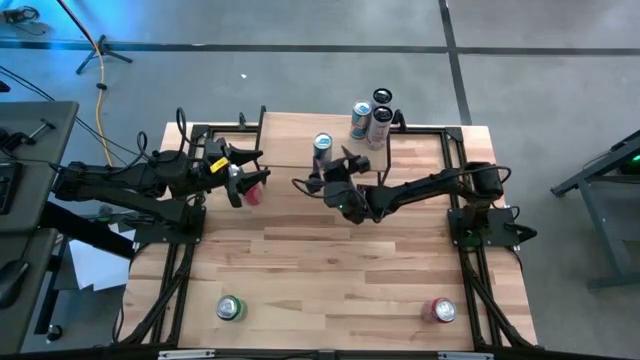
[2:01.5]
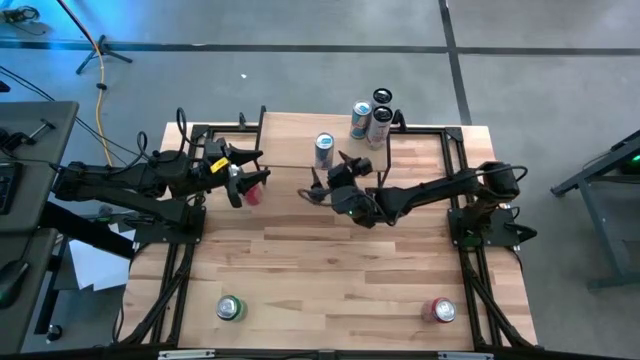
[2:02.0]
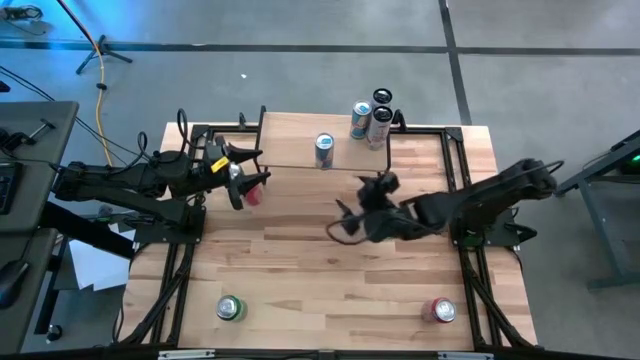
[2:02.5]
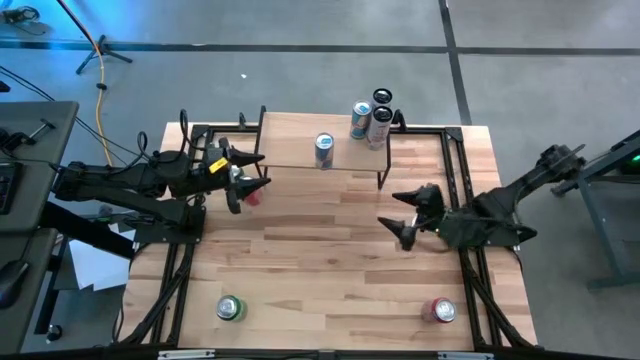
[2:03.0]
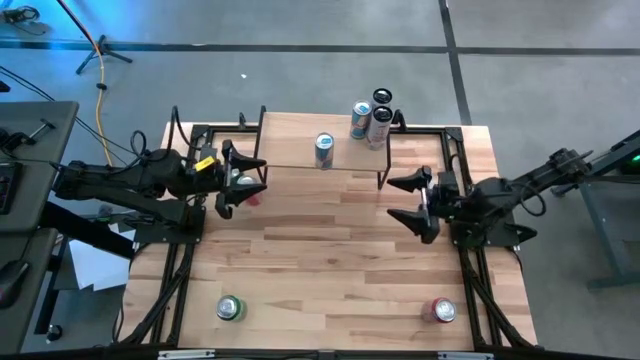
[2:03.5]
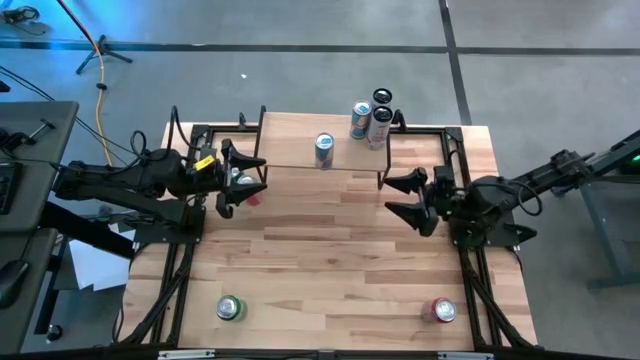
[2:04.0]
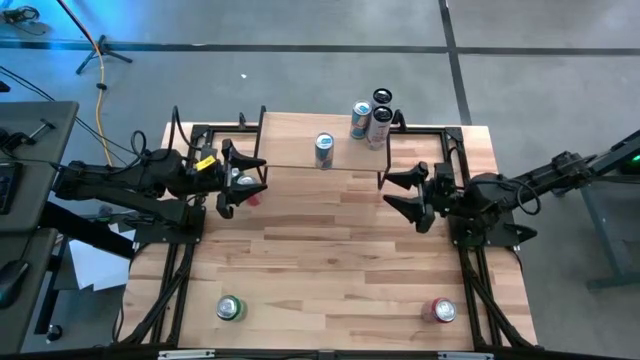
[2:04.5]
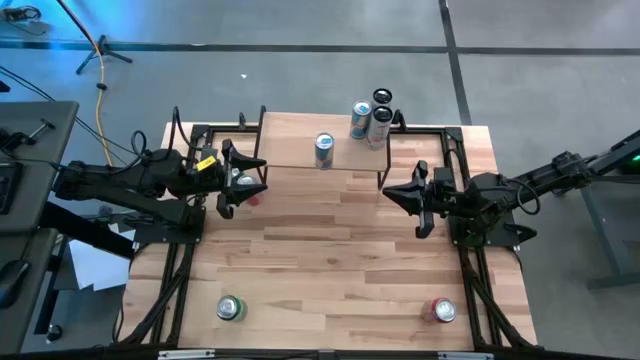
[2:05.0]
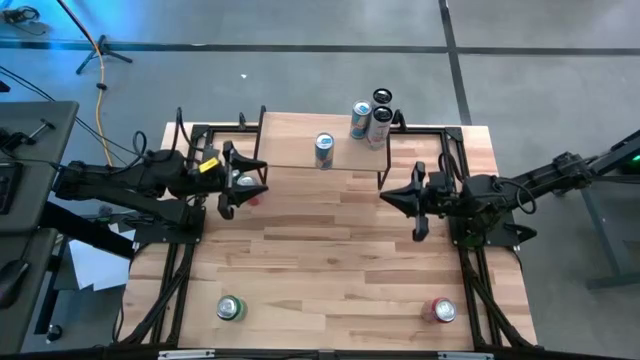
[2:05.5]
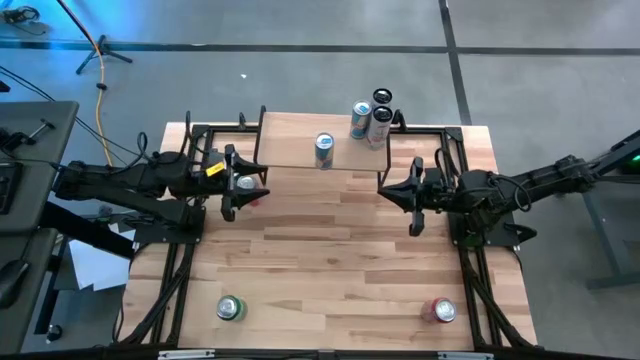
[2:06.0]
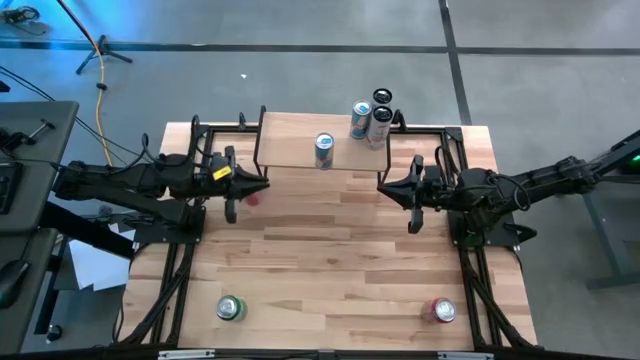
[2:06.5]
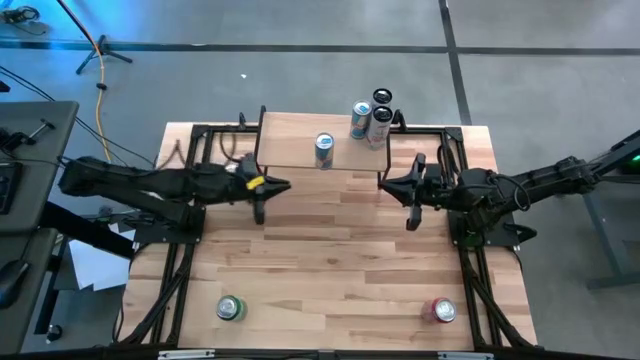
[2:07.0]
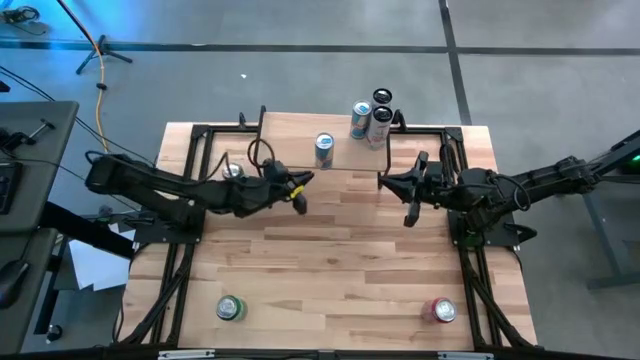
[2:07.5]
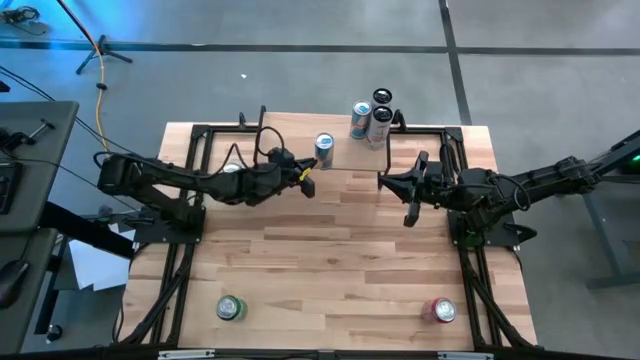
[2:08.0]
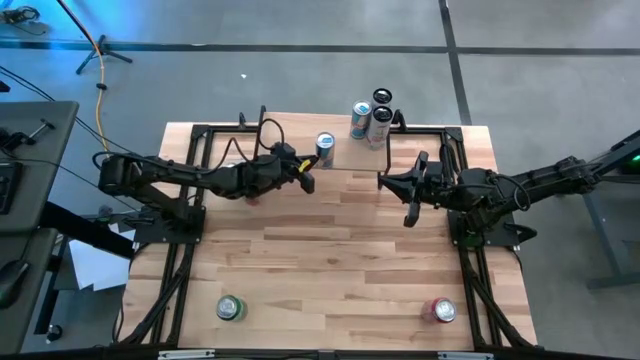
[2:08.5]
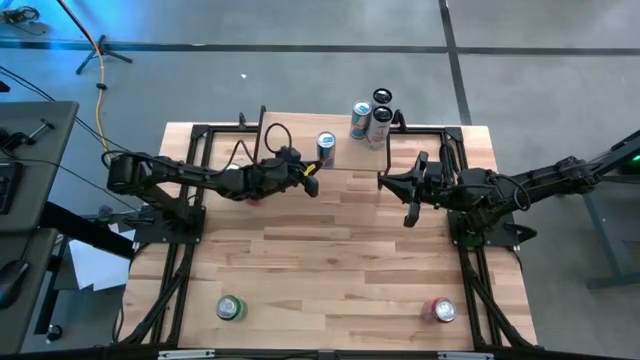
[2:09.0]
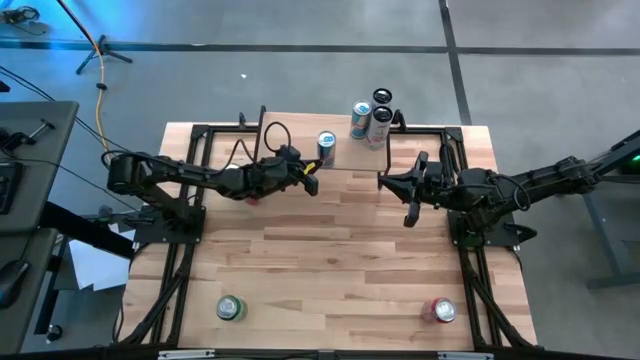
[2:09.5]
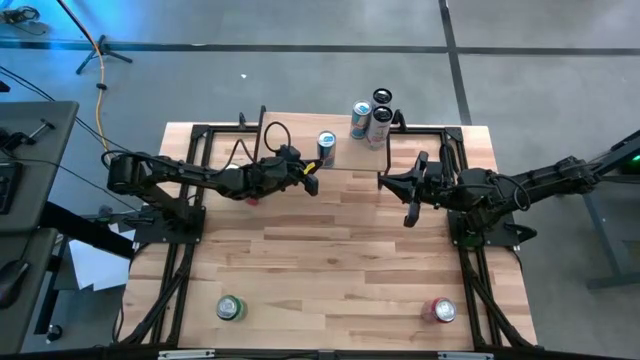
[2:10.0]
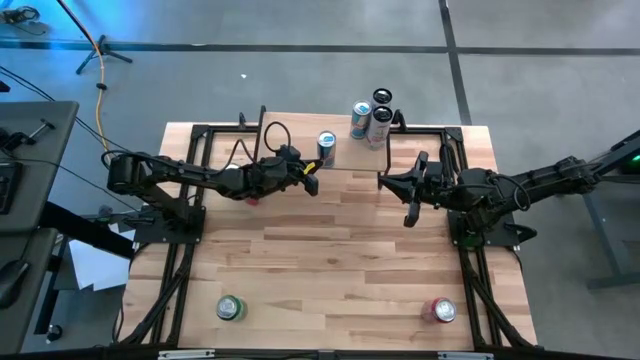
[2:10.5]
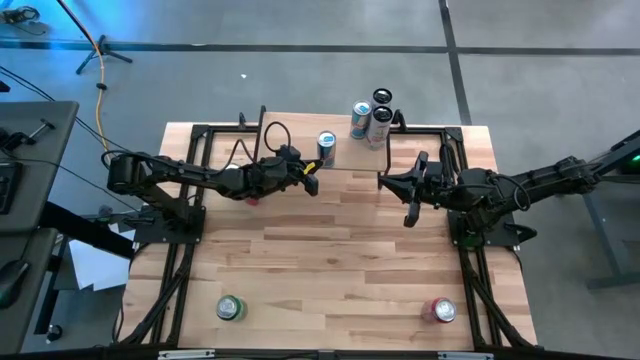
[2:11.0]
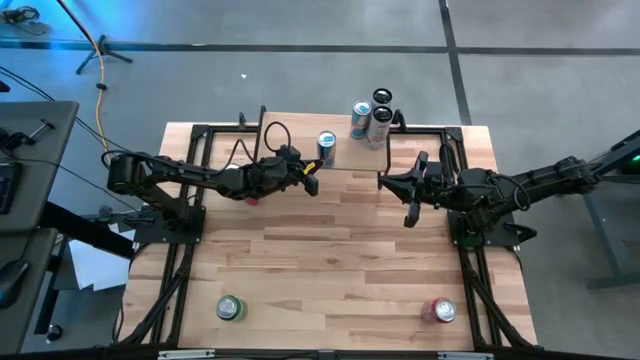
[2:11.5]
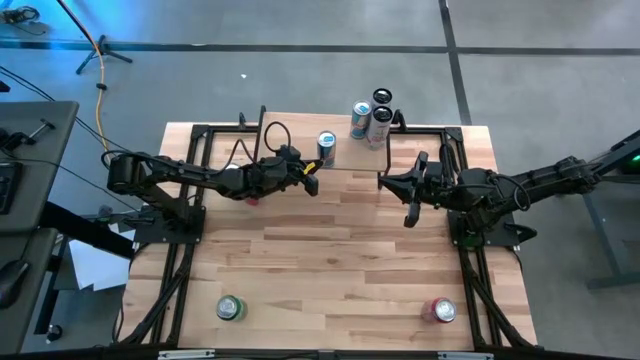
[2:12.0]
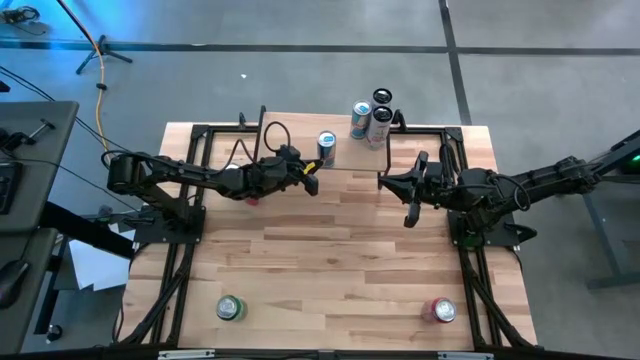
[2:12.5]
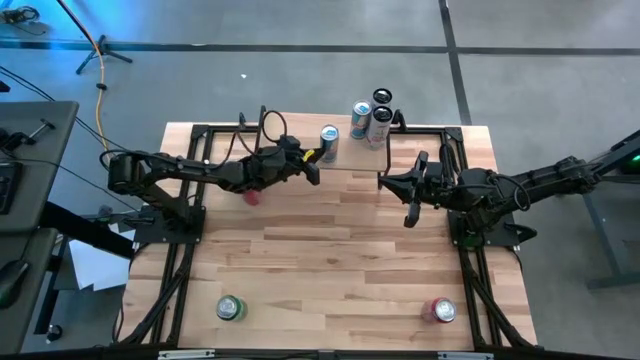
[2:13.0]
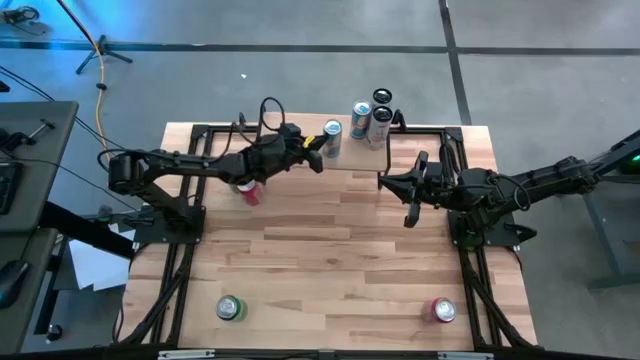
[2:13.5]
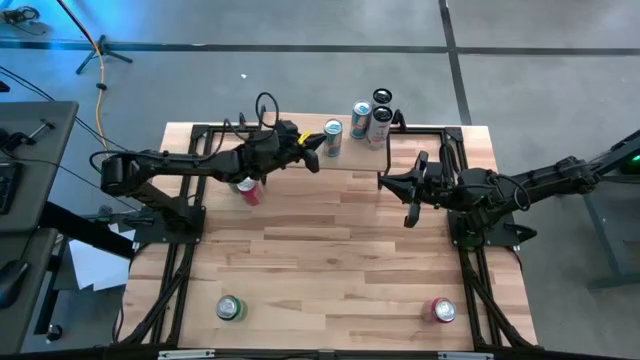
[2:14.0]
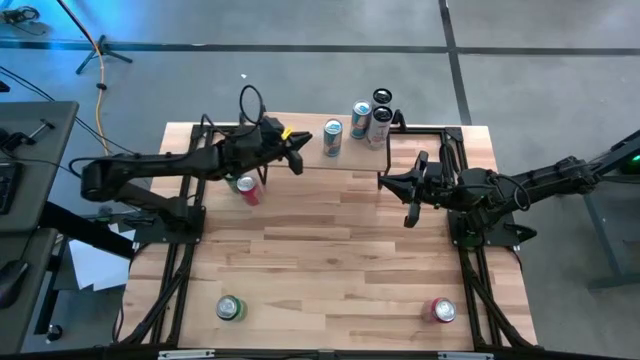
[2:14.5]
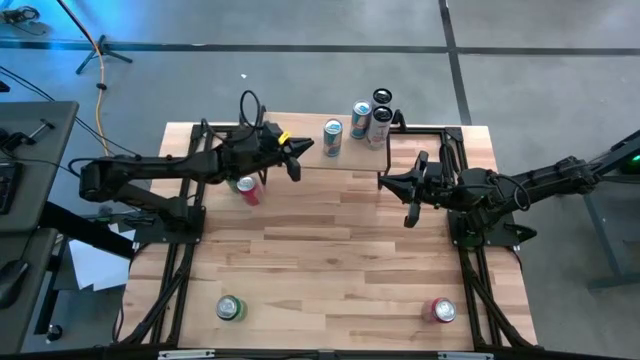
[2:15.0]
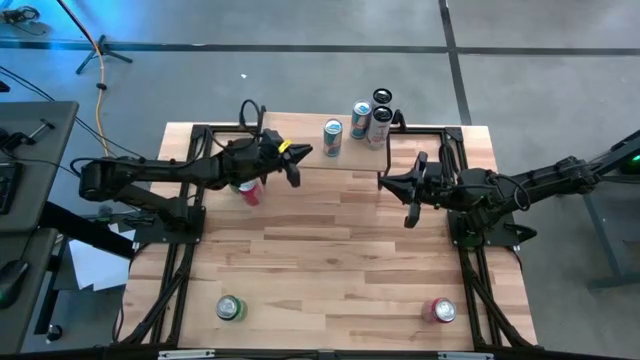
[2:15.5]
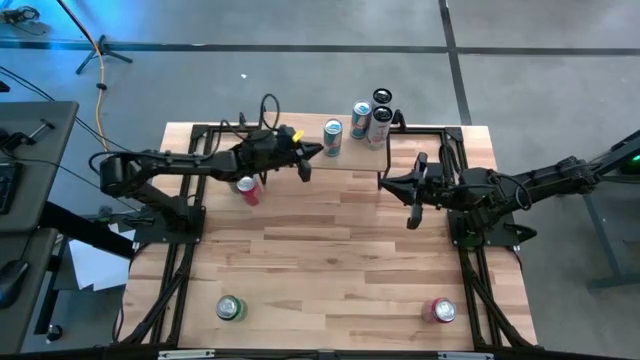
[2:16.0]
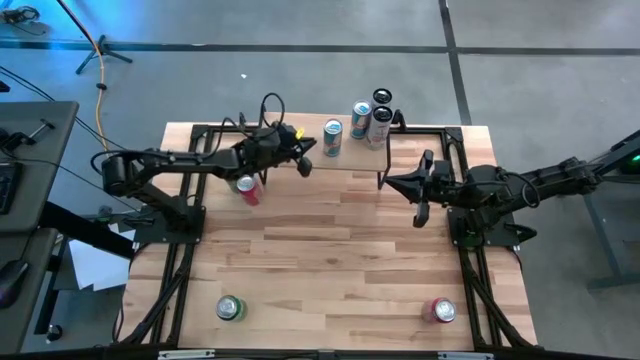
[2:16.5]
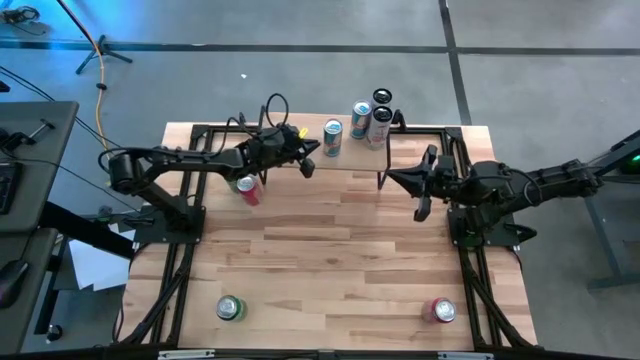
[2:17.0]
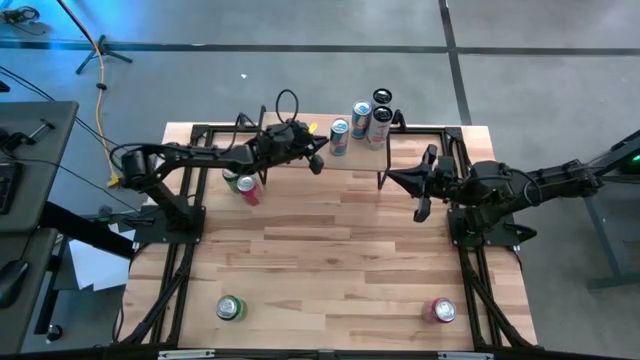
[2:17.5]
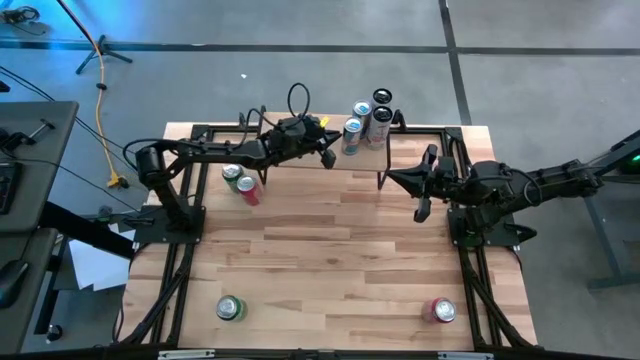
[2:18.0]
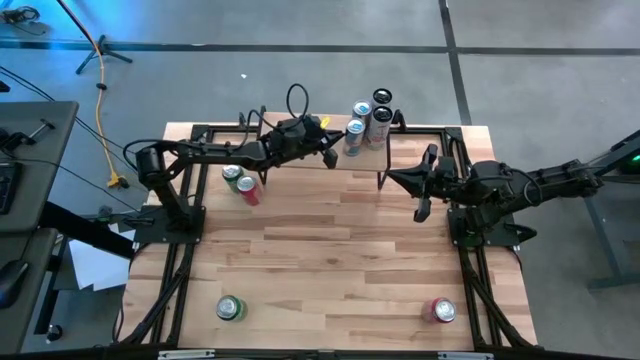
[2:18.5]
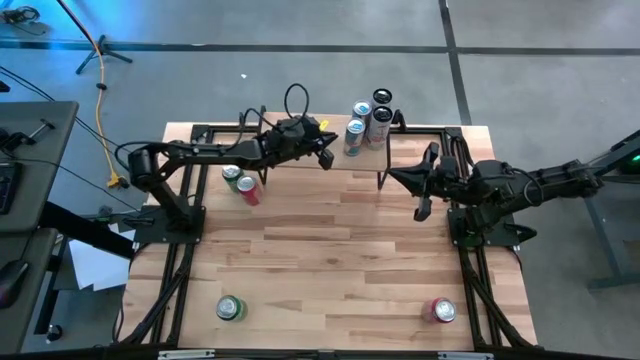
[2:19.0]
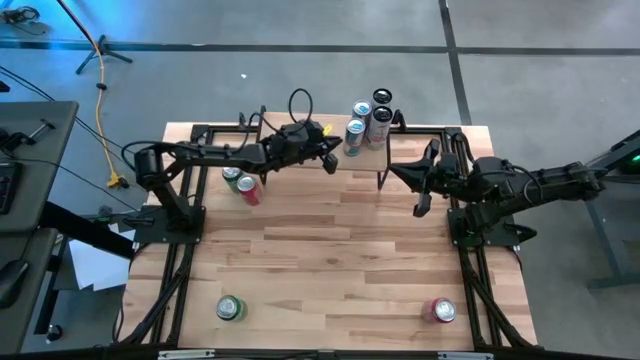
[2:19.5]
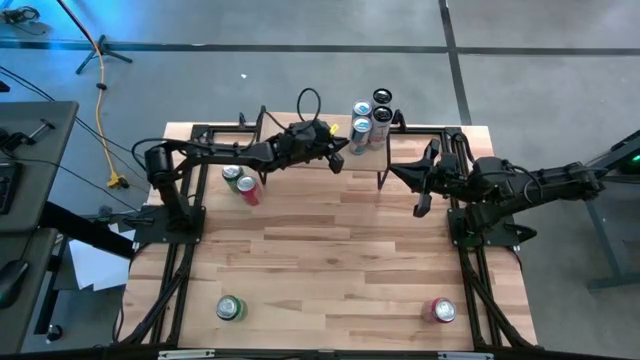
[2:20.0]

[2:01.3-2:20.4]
Task: Place canned beverage on shelf
Put the blue soda can on the shelf aligned with the other blue soda can
